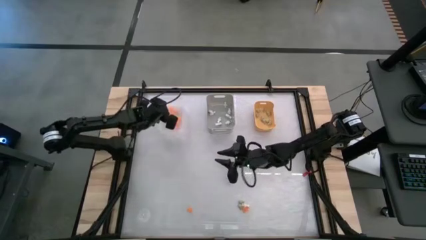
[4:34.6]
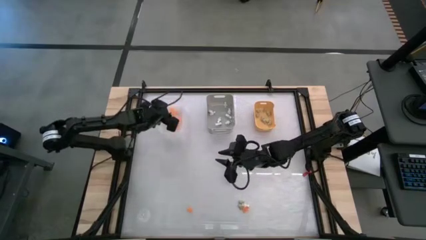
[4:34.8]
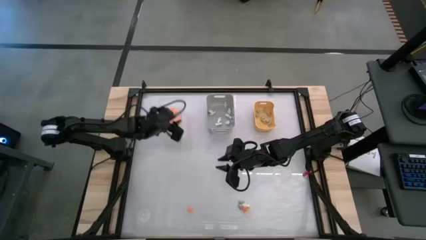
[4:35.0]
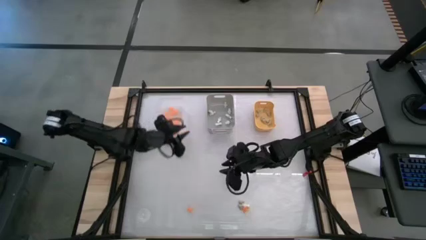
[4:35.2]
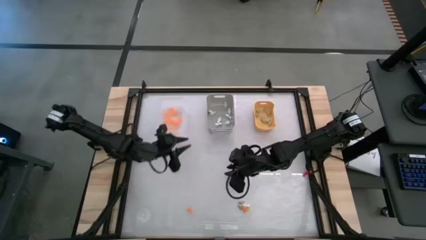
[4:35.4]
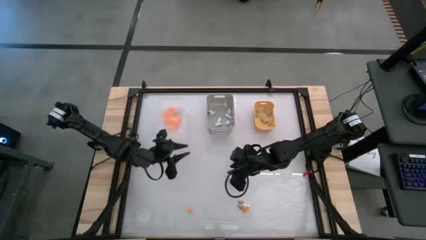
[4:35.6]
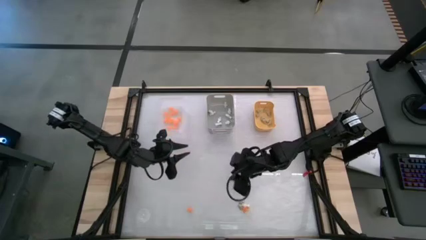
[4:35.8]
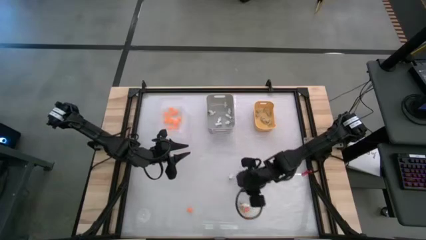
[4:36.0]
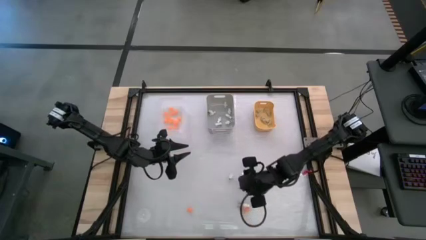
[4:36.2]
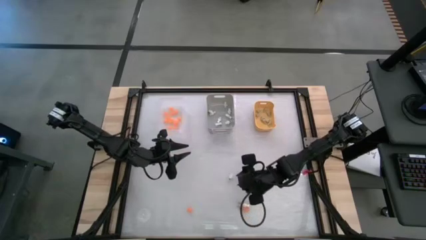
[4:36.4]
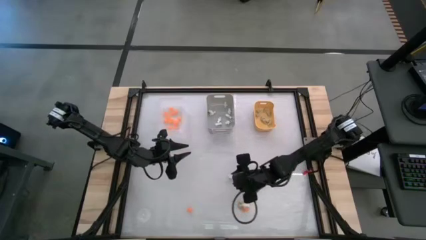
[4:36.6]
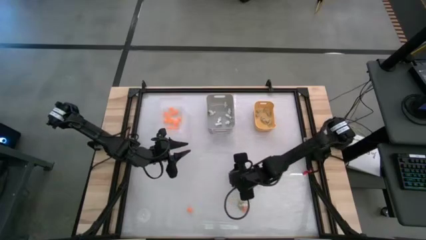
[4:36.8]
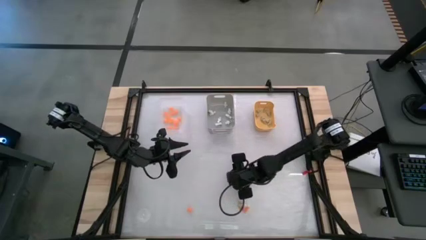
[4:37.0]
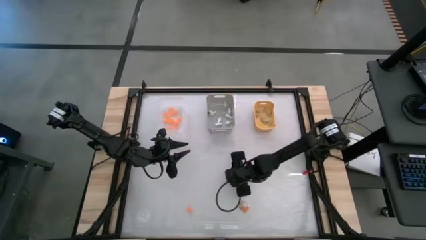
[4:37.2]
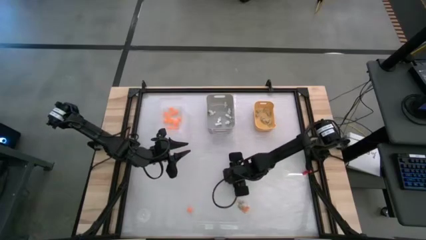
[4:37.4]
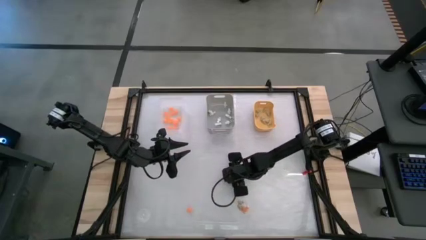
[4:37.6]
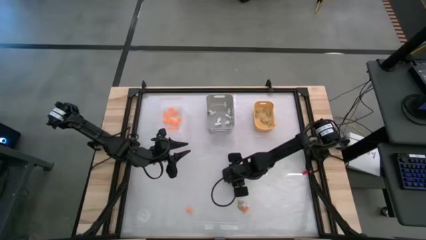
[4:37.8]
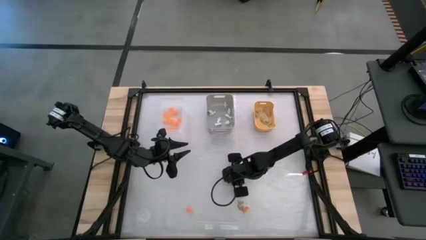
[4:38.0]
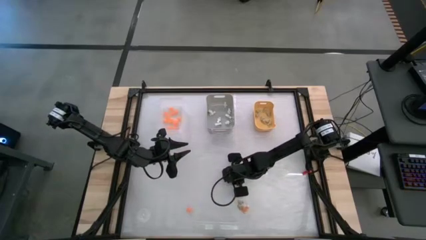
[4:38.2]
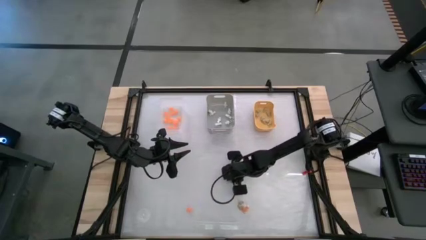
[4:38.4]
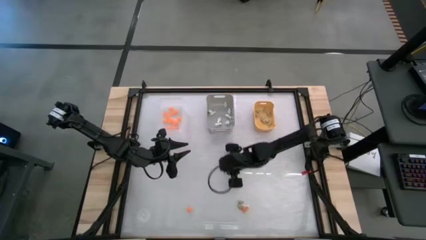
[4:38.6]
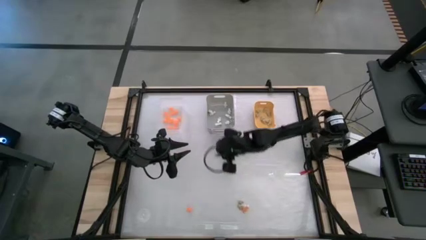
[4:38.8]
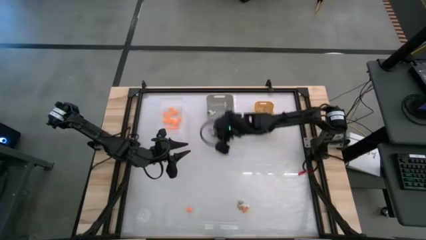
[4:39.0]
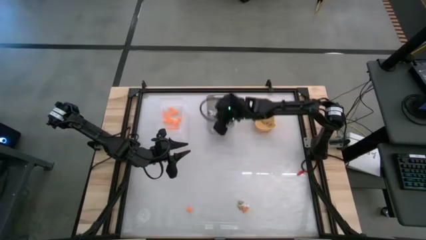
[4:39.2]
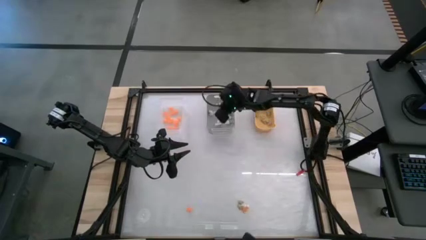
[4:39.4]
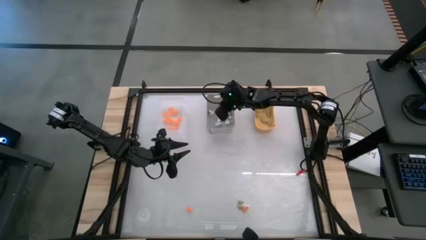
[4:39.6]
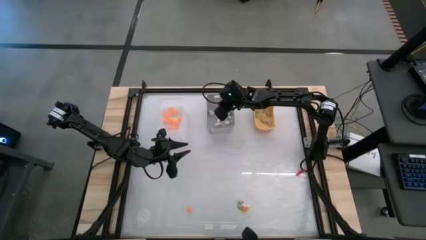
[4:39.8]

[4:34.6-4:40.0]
Task: Sort Halloween decoration
Put the white skeleton toy into the gray bin

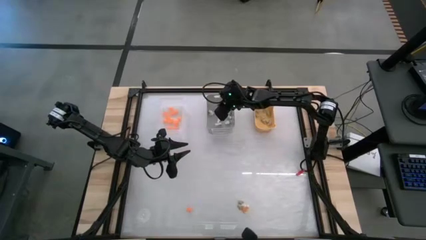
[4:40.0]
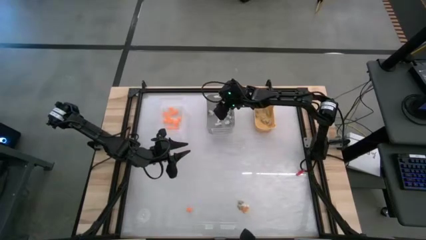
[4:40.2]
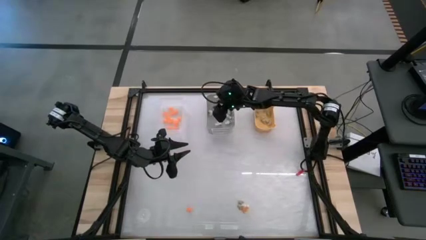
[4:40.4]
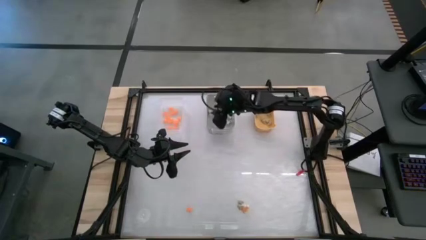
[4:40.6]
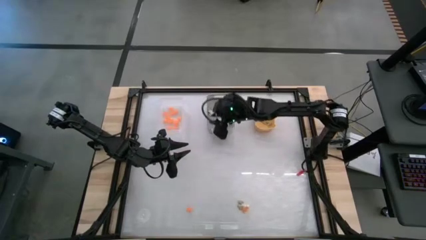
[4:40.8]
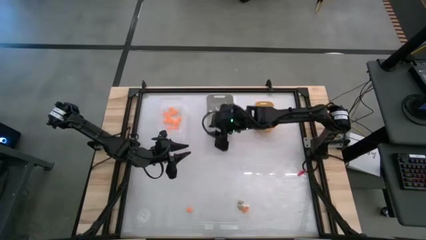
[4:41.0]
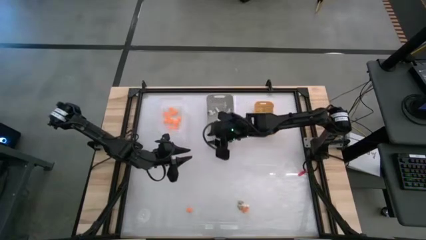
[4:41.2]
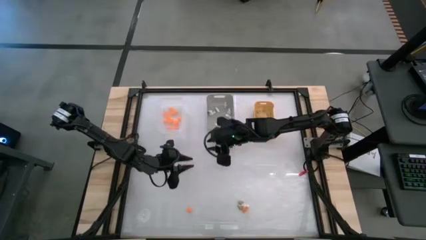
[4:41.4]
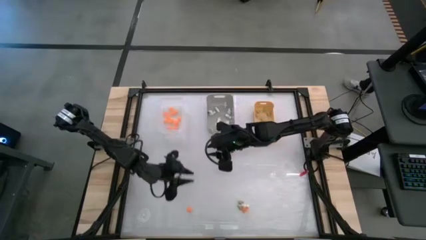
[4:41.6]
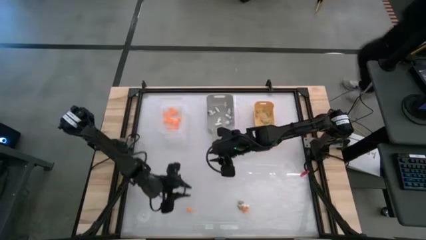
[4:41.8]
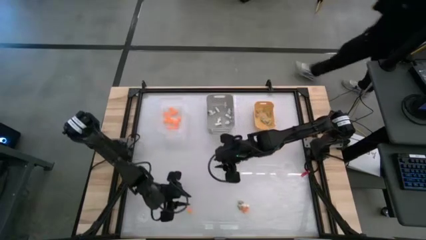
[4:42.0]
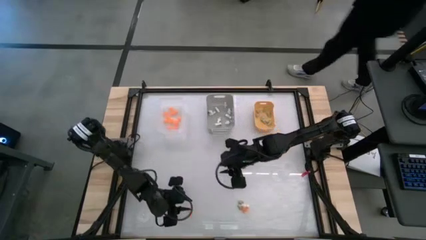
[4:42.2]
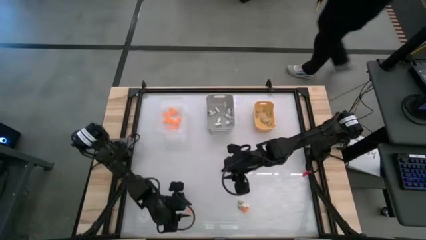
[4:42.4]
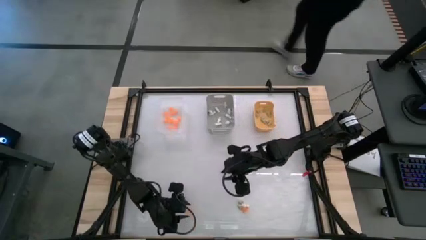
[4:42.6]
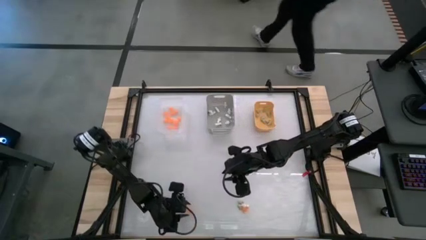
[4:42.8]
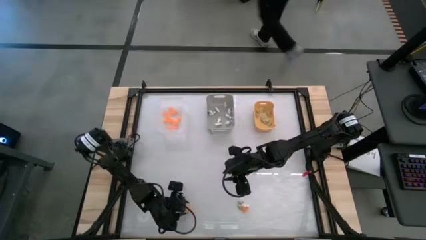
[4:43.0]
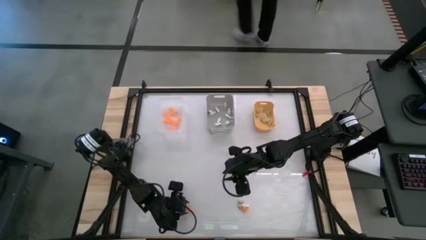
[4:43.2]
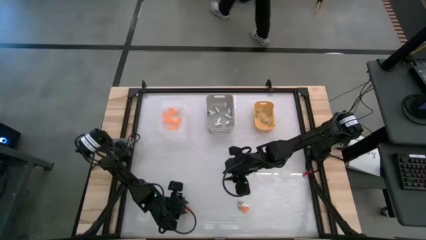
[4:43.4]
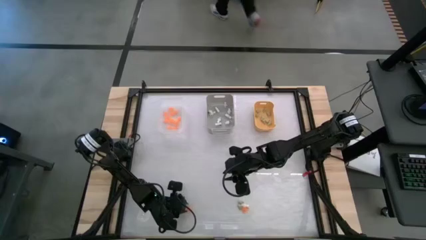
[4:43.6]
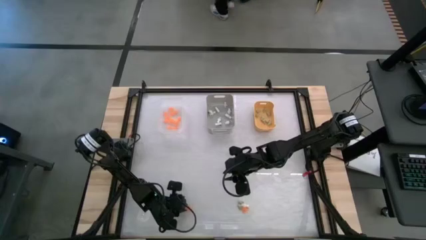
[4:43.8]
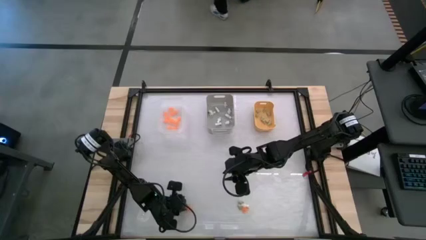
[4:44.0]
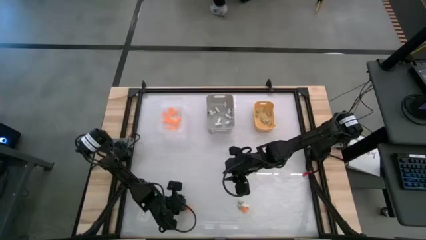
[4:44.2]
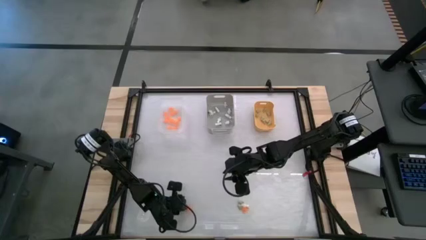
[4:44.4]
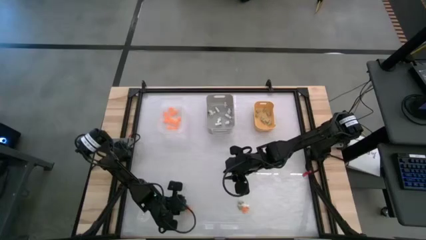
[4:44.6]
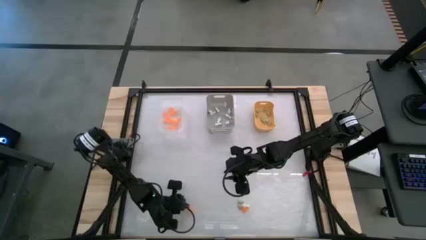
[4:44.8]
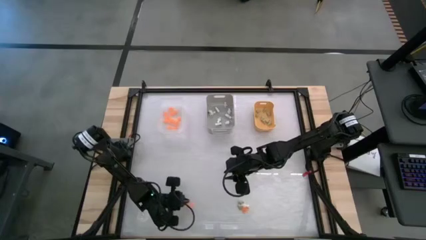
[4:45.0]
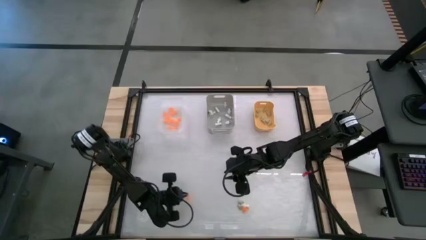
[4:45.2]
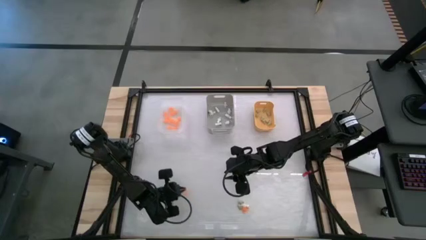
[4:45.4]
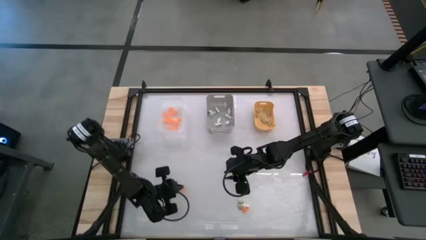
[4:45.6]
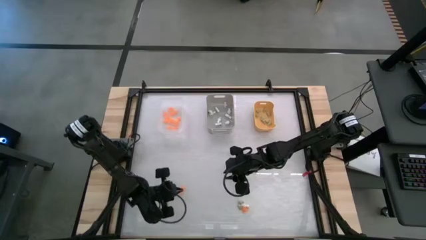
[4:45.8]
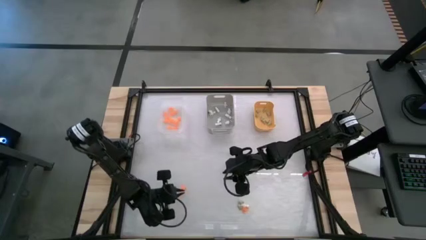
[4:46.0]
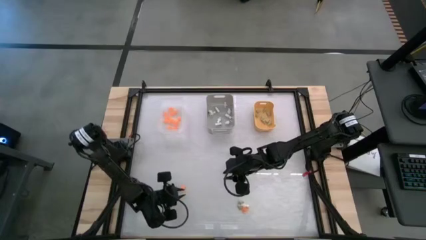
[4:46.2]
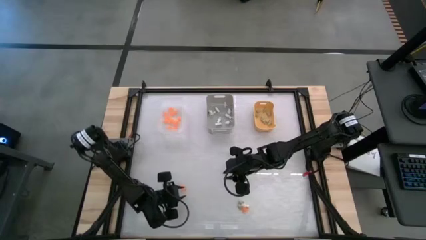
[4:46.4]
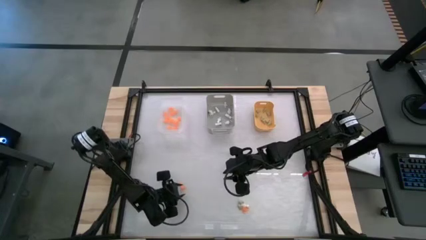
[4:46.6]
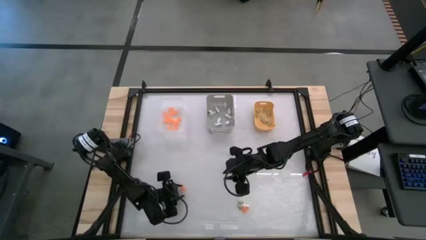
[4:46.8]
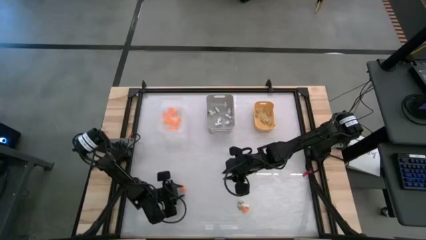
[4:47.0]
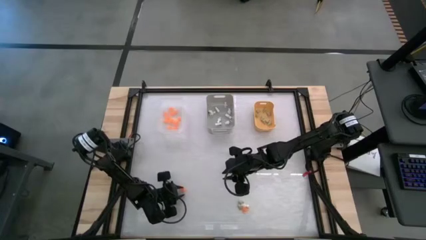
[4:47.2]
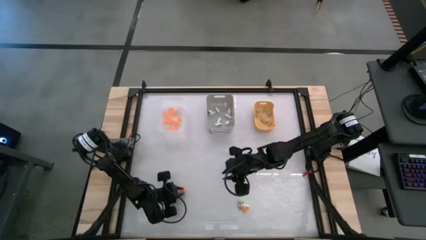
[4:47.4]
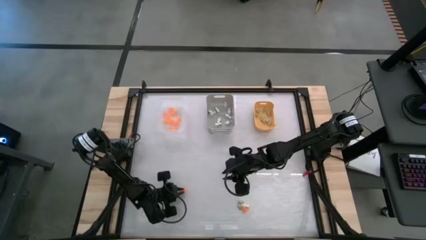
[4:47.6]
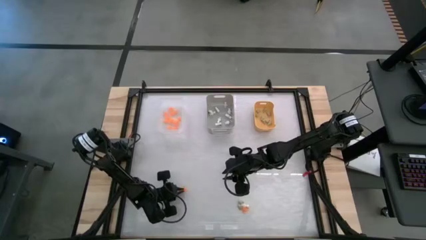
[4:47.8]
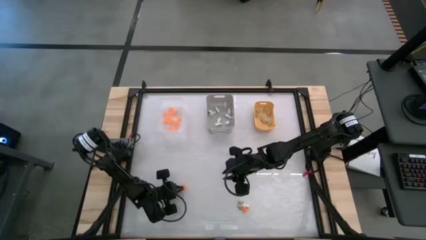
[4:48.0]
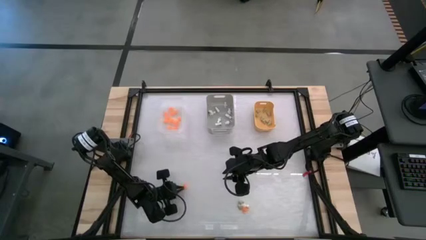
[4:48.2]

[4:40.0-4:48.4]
Put the orange spider toy into the transparent white bin

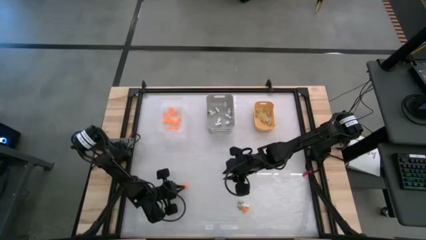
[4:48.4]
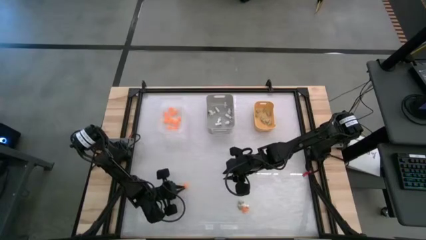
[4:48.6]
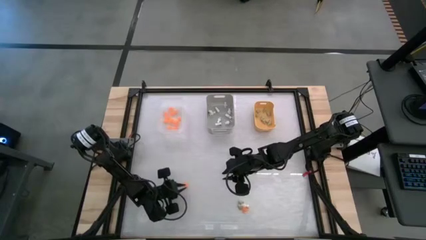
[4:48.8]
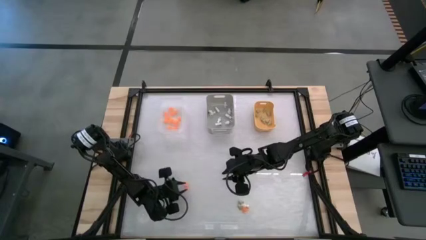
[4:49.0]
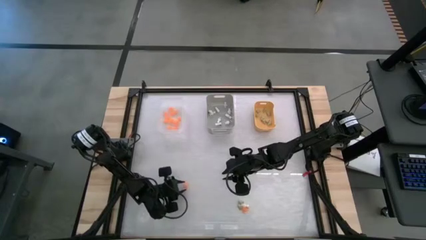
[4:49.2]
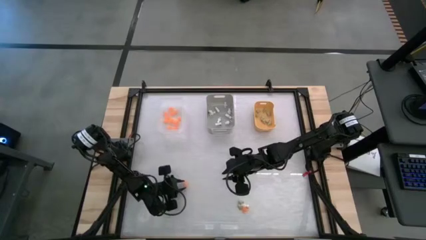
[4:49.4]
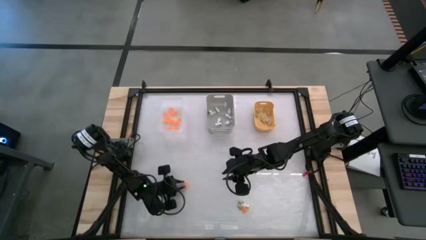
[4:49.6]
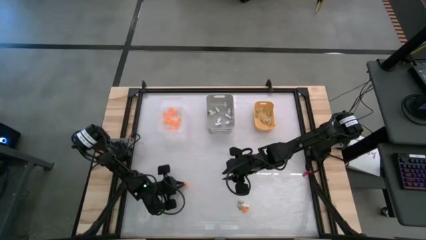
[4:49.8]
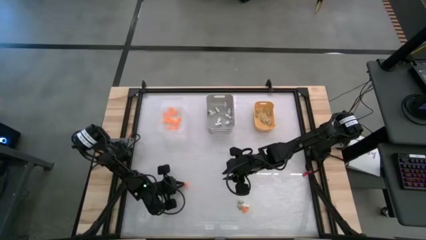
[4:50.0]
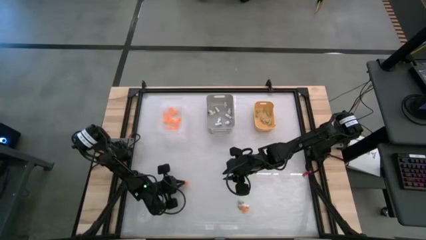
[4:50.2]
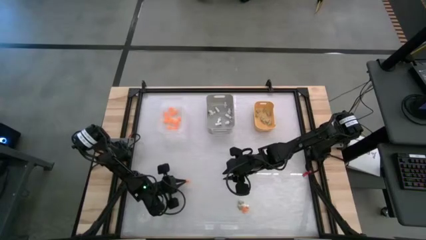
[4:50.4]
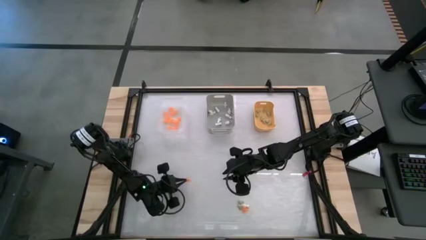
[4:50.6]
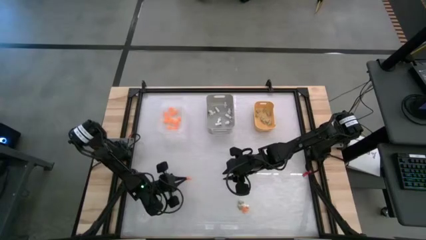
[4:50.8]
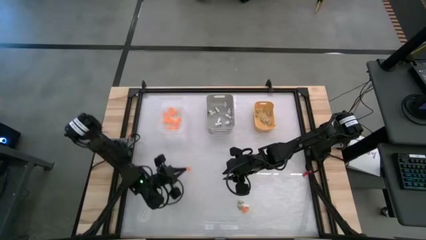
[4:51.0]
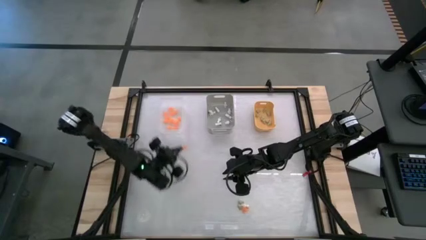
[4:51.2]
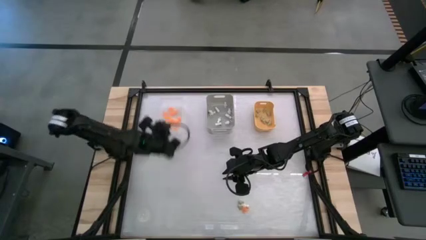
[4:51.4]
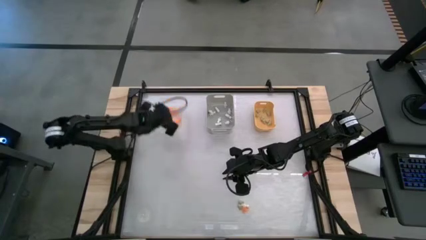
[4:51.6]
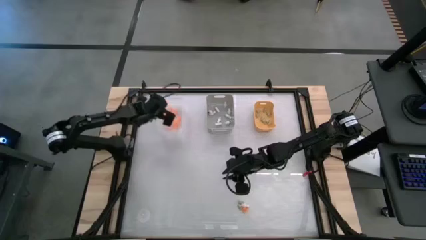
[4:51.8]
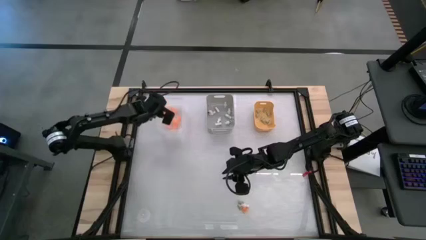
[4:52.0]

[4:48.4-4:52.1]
Put the orange spider toy into the transparent white bin
